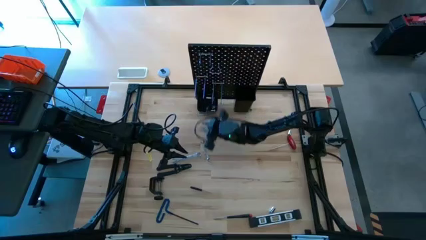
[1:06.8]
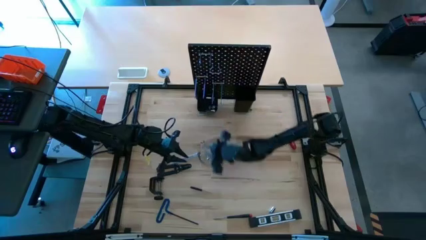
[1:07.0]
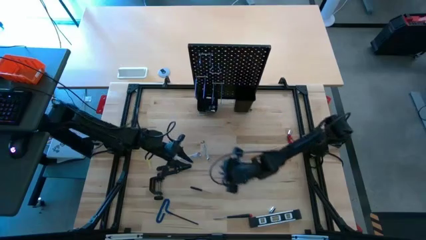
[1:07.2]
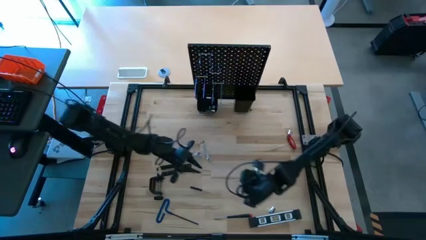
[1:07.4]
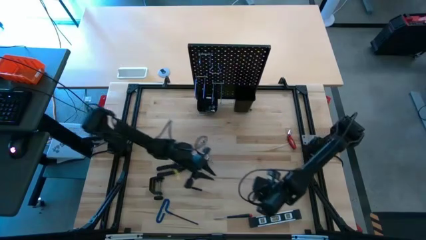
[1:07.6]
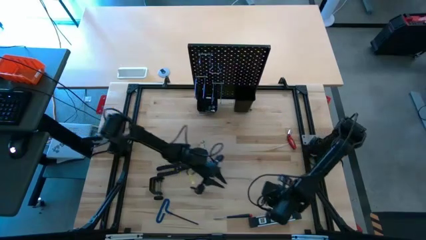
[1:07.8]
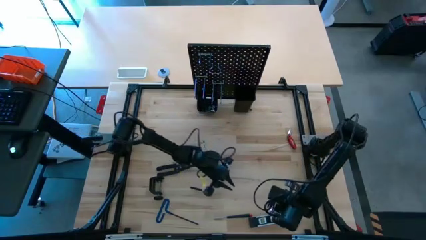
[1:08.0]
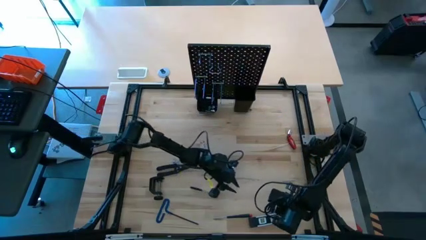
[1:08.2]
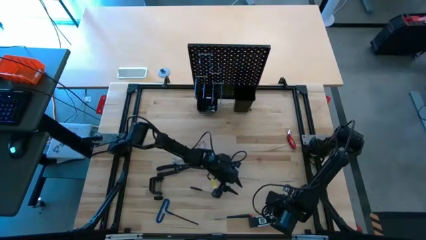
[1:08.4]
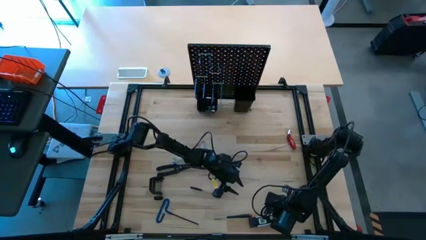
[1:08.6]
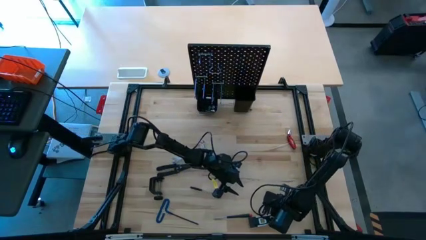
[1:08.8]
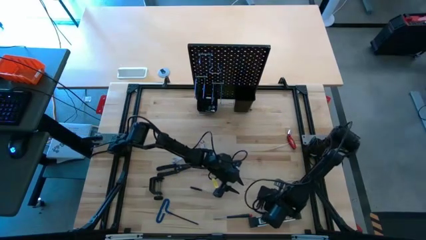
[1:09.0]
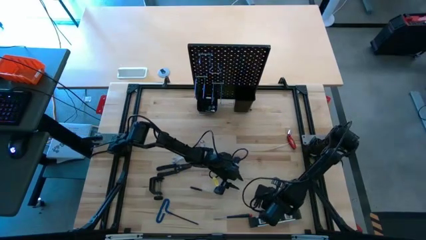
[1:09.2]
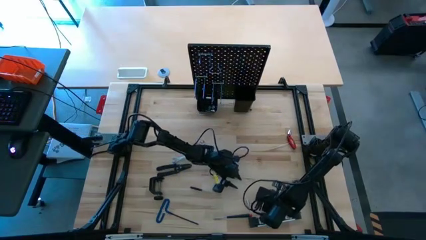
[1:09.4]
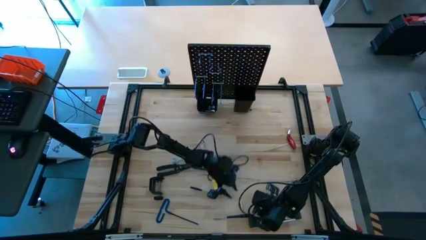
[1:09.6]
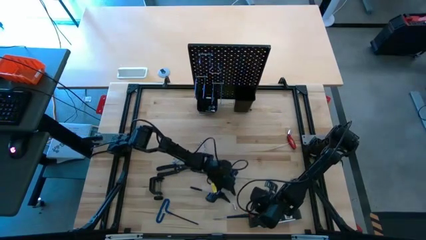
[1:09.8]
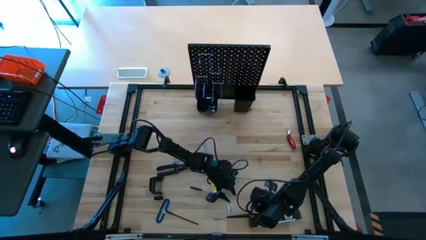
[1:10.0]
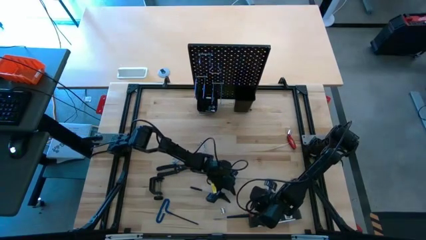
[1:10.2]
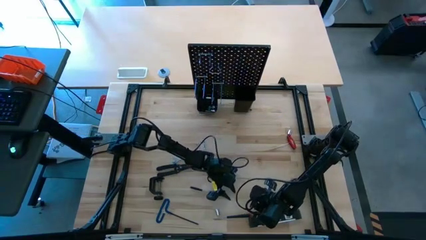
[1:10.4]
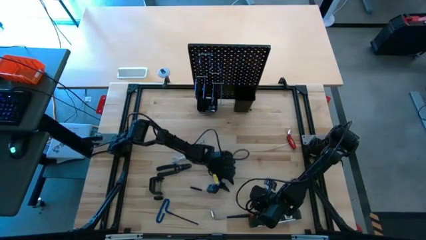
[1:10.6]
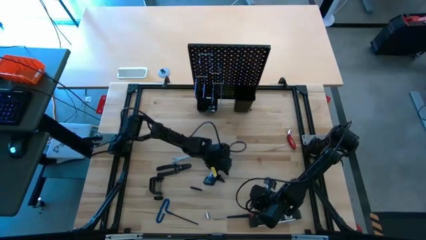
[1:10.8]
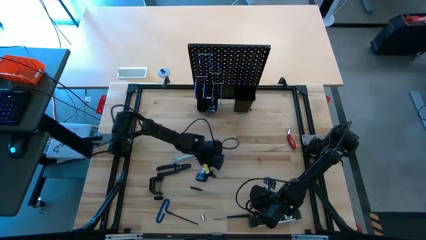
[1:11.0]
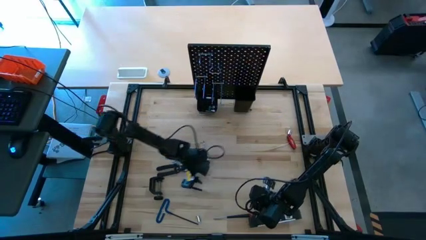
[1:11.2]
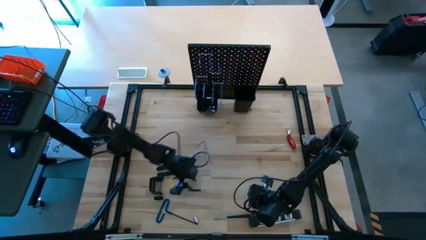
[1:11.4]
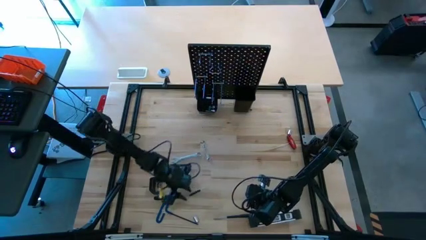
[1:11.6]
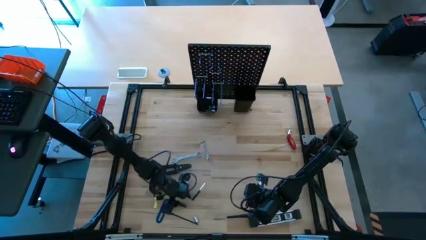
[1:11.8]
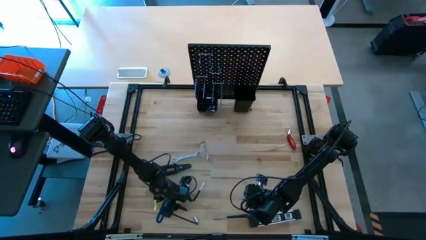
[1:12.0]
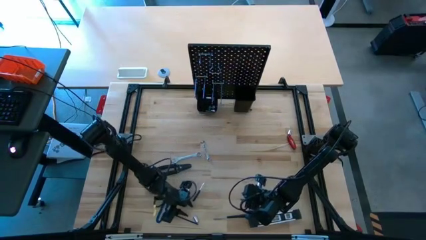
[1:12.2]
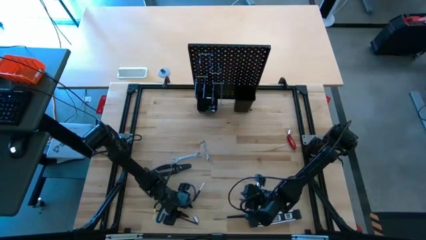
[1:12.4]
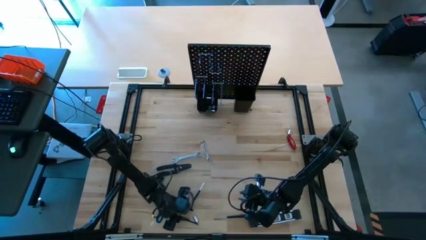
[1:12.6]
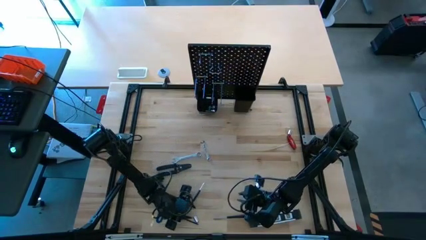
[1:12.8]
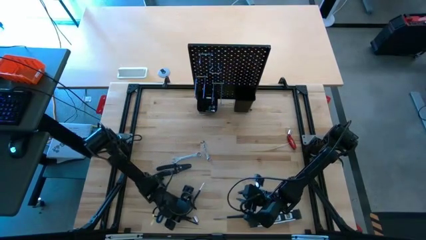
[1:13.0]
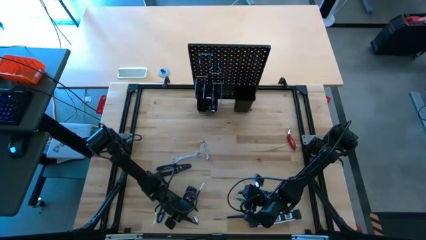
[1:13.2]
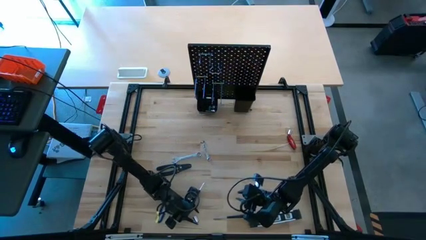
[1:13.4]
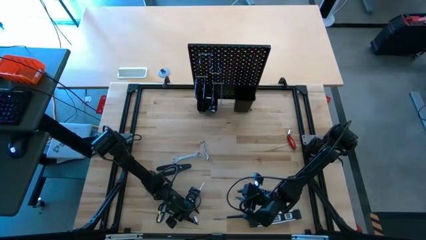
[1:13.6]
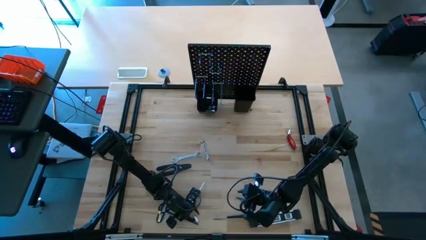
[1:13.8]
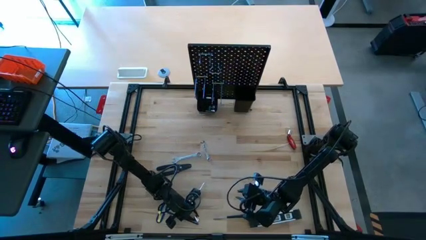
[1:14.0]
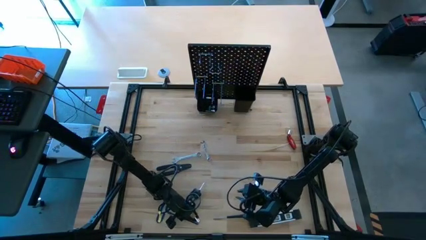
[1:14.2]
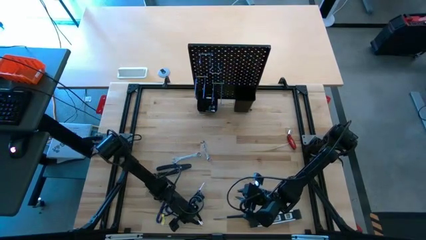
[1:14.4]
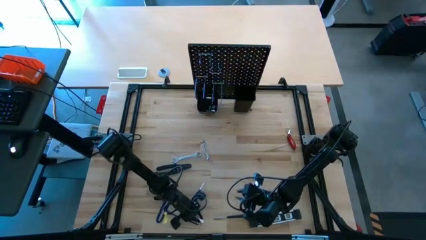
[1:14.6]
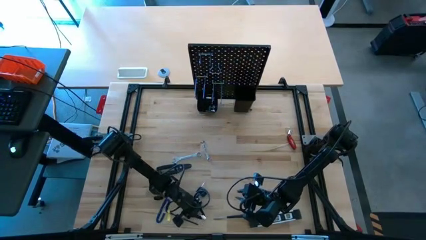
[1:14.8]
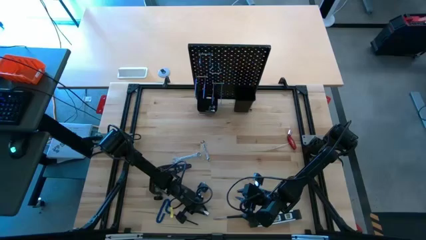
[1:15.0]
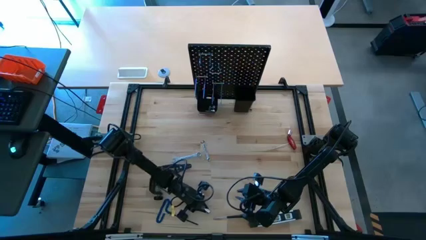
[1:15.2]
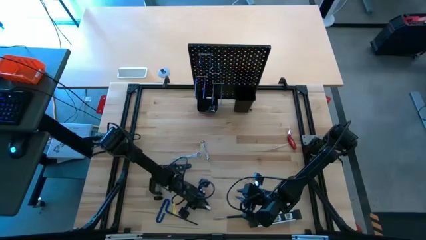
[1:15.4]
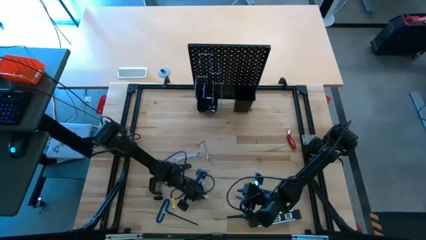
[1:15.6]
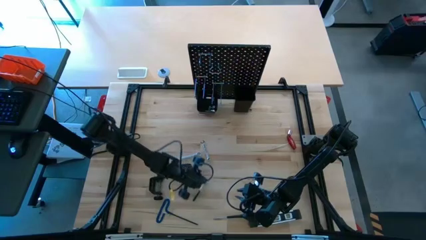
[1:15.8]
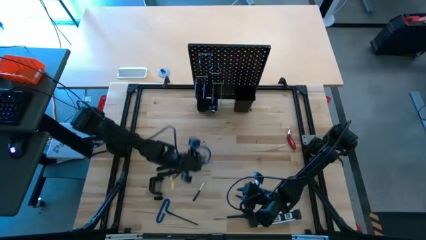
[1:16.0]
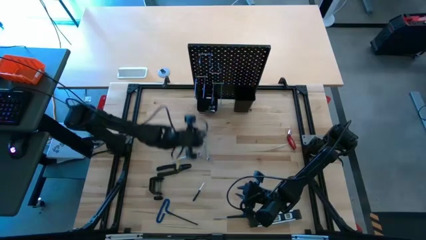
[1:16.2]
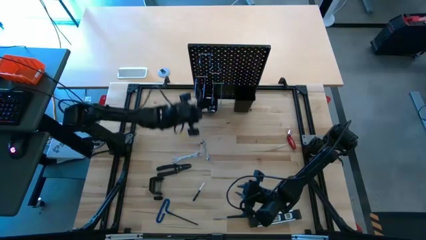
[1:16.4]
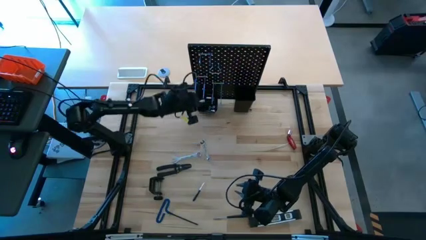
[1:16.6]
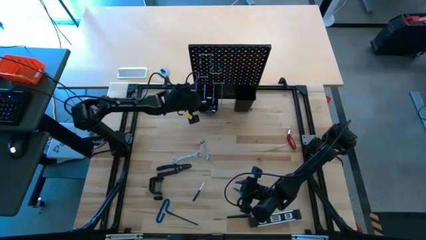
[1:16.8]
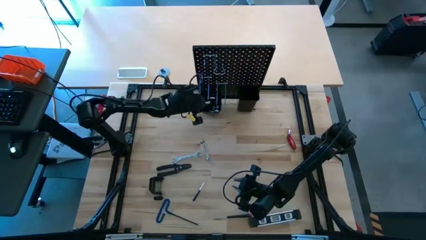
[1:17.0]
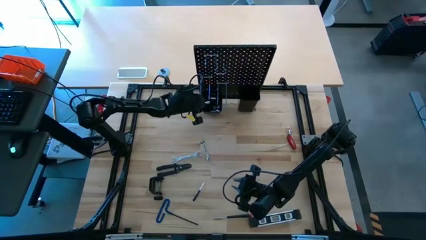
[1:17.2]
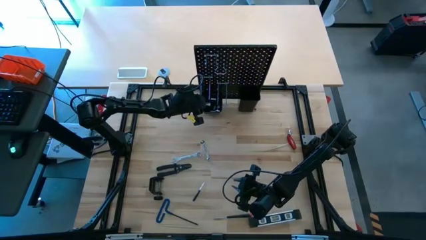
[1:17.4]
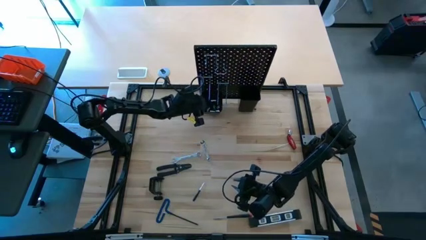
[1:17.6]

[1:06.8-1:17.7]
Task: Hang tools onto peg board
Put the socket into the left bin on the pegboard

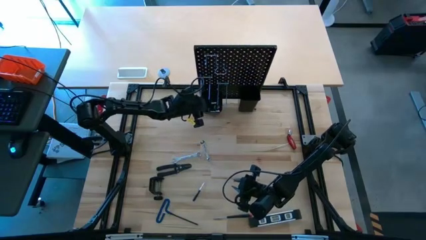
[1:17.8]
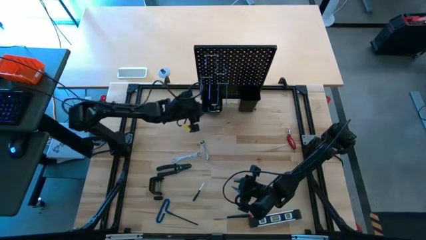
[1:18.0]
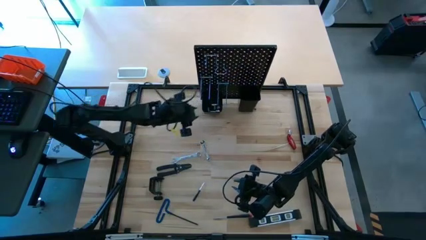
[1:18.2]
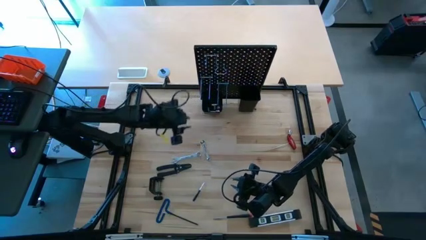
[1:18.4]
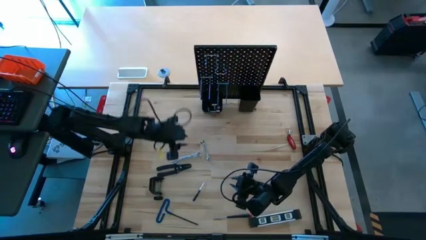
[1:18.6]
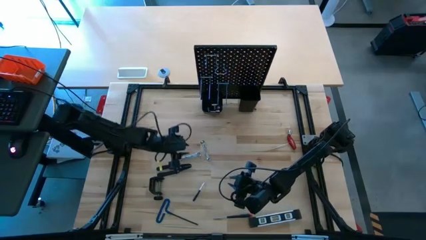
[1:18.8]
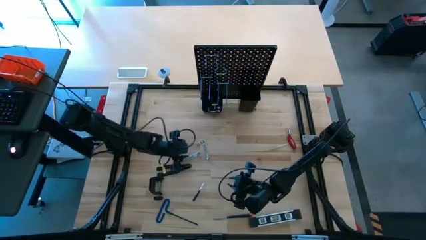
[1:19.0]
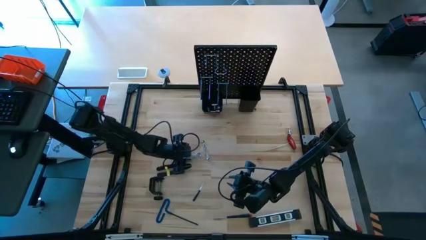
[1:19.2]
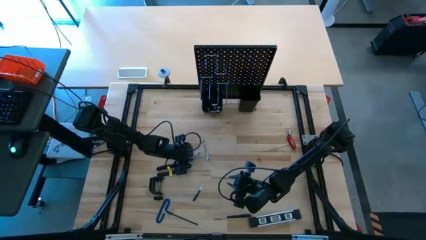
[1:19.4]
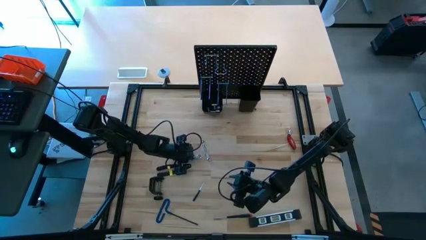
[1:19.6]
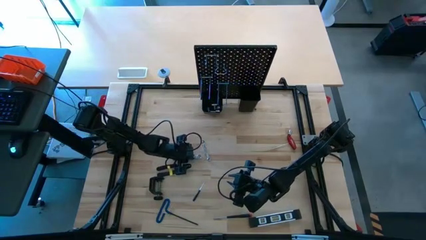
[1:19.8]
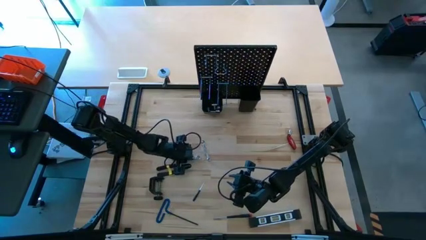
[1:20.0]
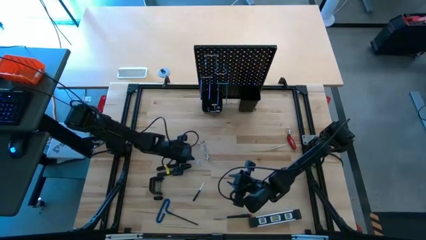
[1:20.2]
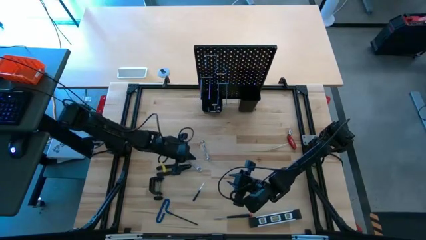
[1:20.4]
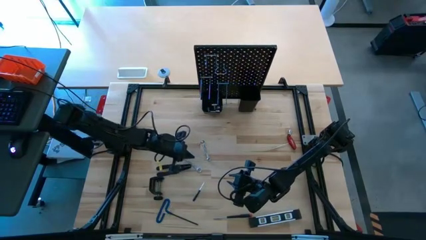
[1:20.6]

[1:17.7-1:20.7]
Hang the wrench onto the pegboard

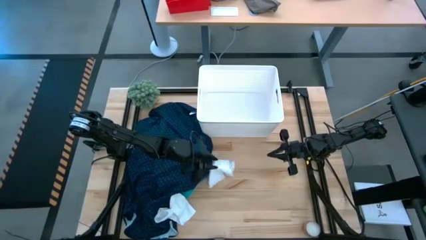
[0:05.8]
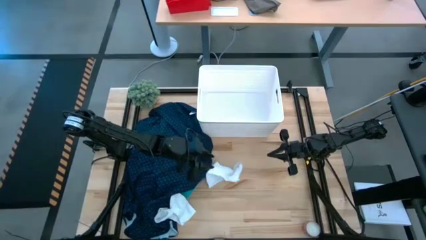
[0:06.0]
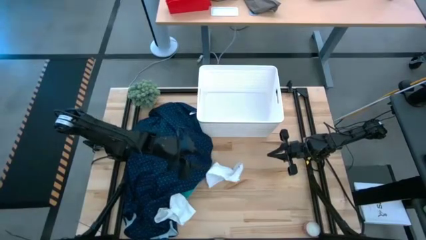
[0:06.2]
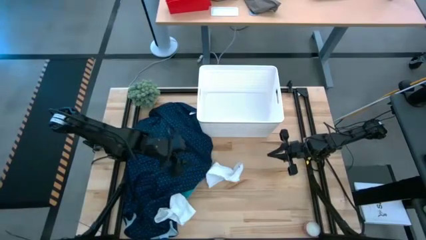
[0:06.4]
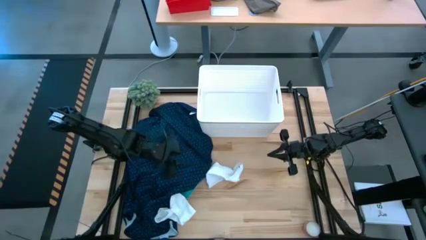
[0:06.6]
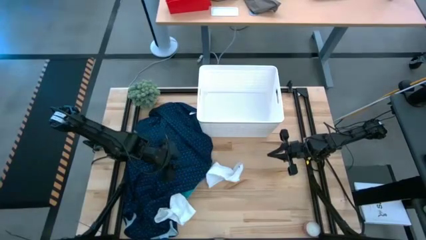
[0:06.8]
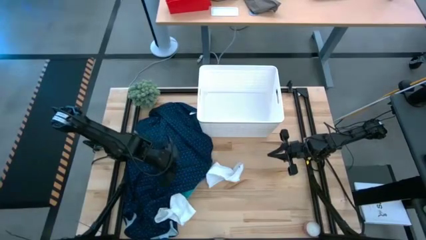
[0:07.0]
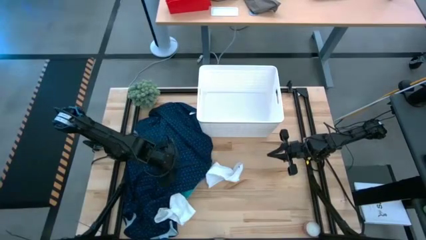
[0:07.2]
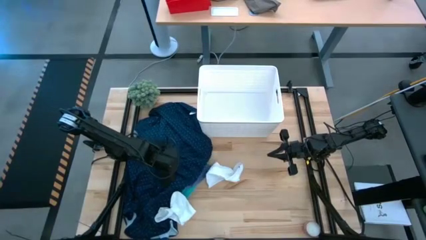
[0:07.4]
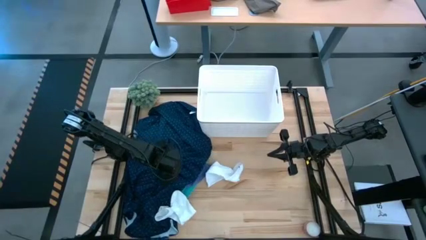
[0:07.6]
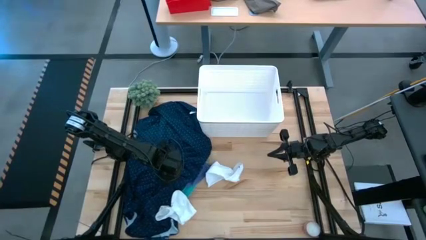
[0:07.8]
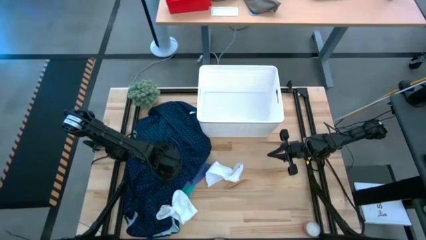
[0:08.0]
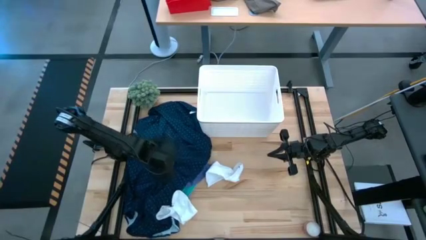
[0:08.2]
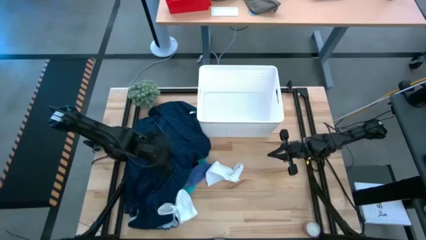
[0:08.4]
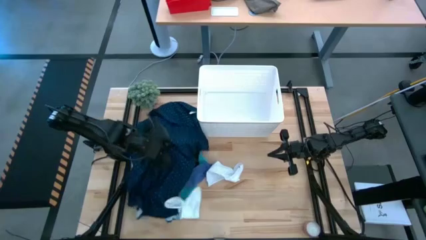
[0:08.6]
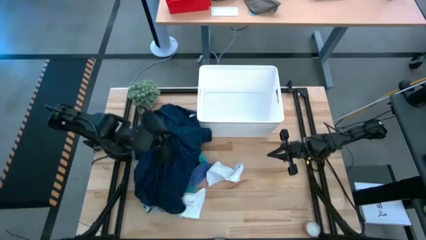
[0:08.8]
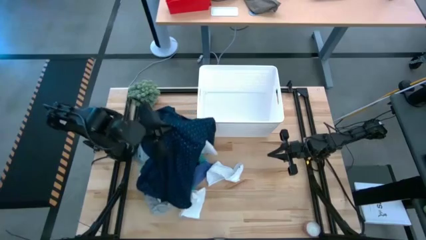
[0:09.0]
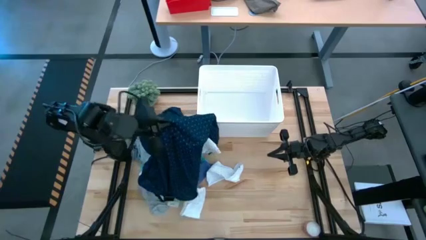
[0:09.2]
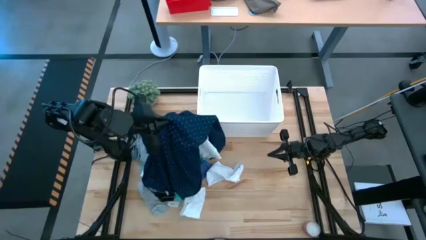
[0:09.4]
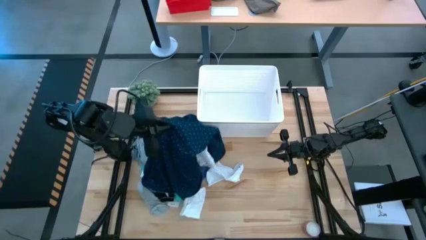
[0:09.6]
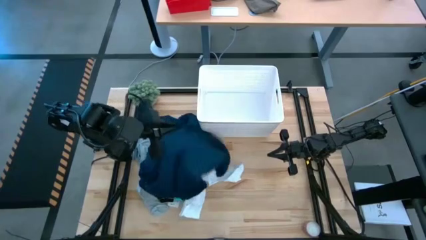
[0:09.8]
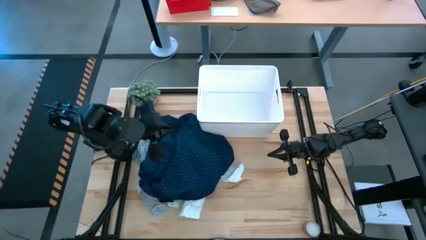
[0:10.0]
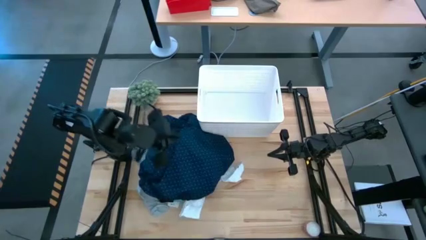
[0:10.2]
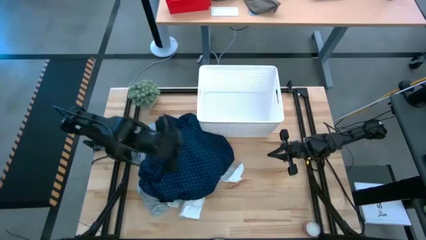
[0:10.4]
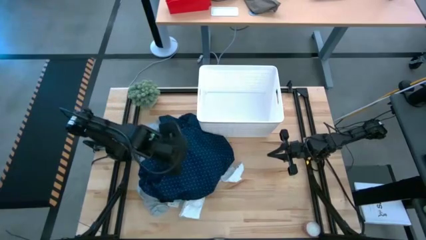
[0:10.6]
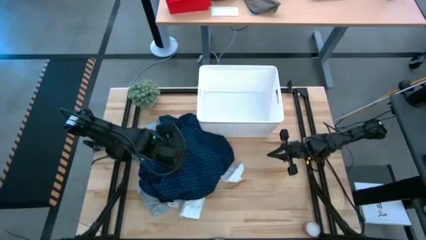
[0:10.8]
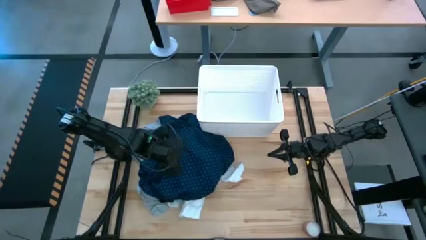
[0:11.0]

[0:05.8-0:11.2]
Task: Sort clothes
Put the blue polo shirt into the white bin
